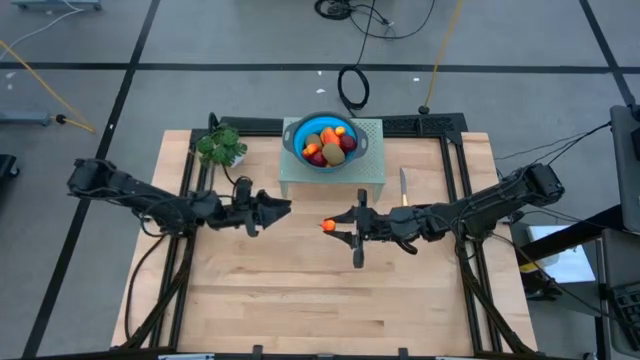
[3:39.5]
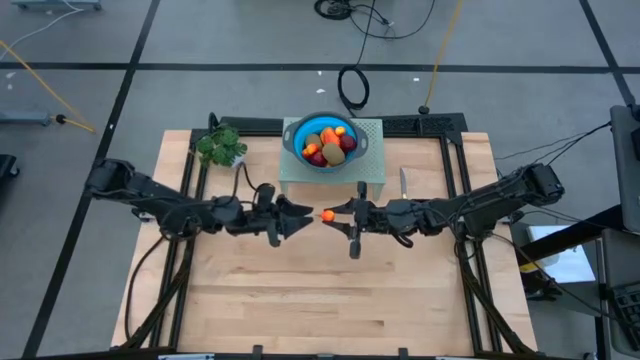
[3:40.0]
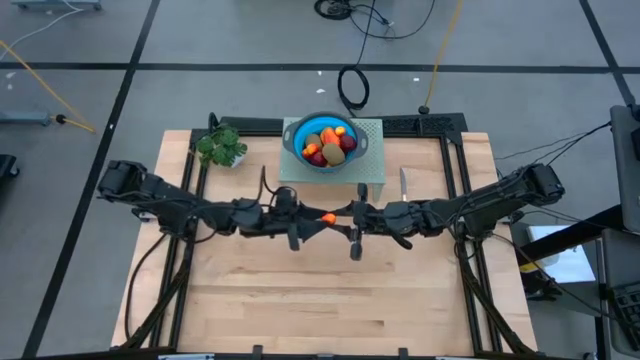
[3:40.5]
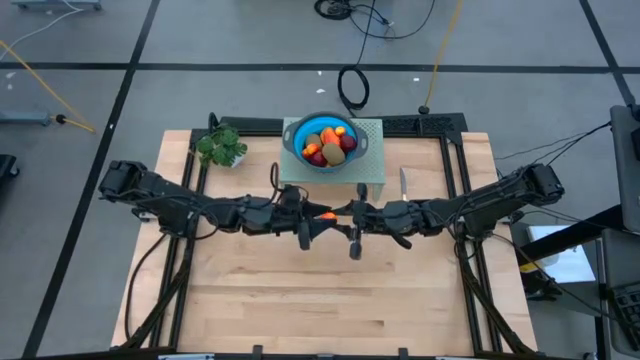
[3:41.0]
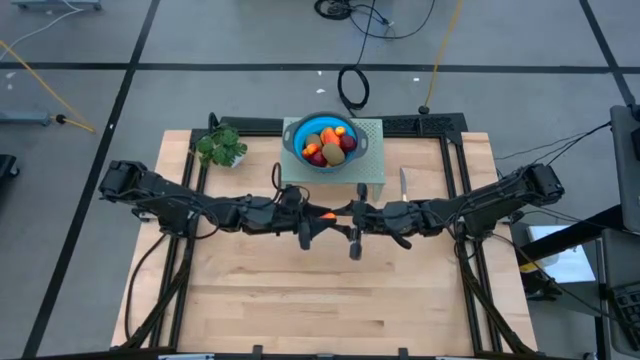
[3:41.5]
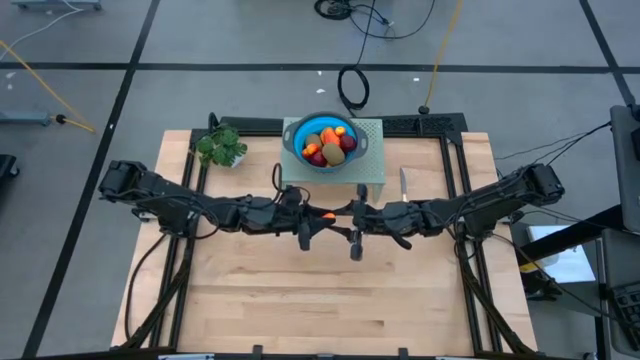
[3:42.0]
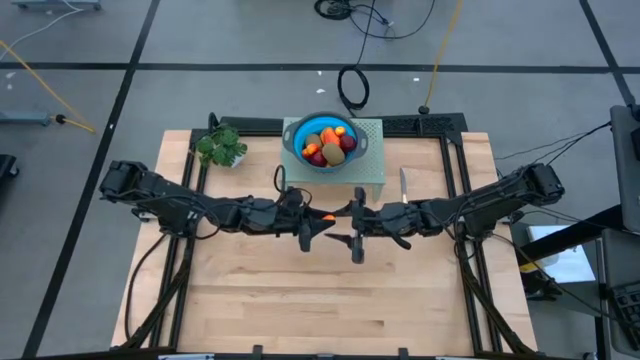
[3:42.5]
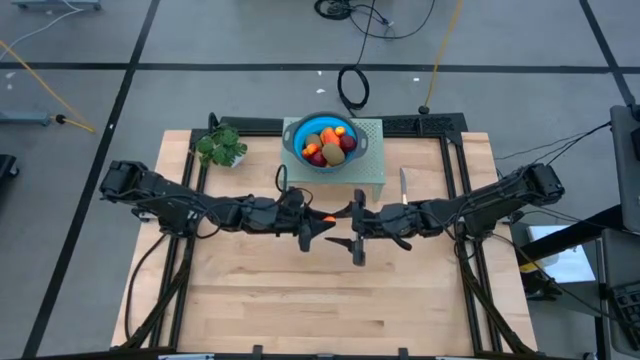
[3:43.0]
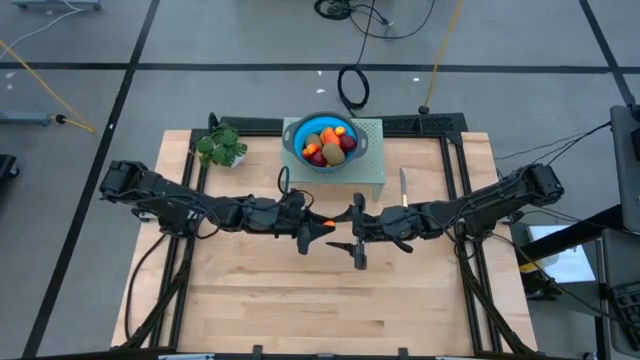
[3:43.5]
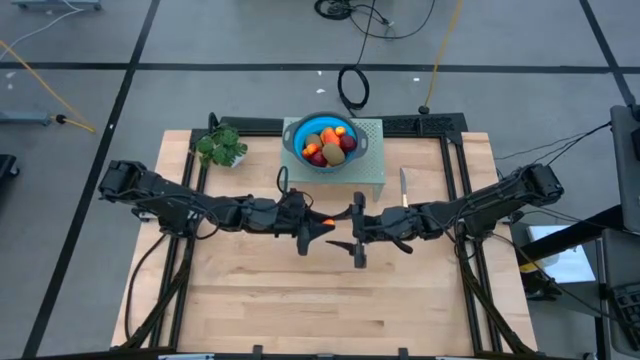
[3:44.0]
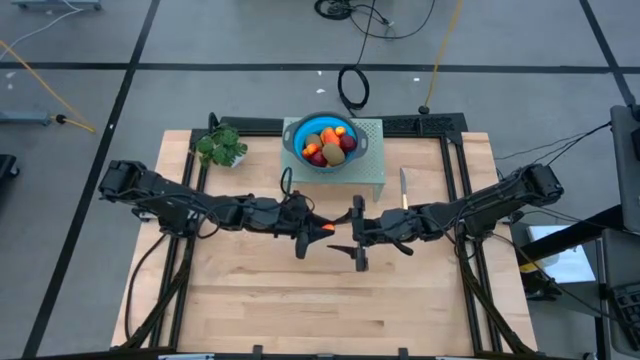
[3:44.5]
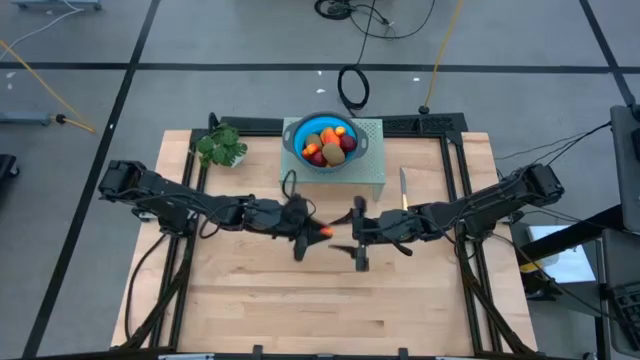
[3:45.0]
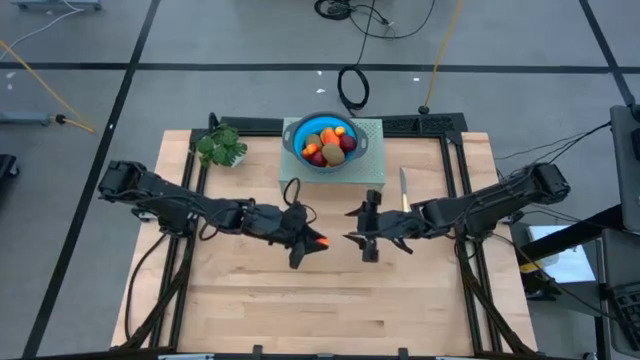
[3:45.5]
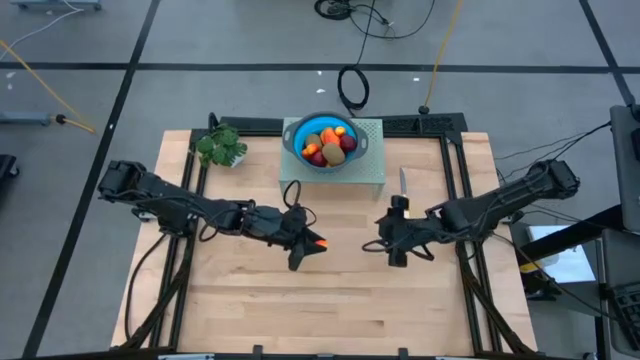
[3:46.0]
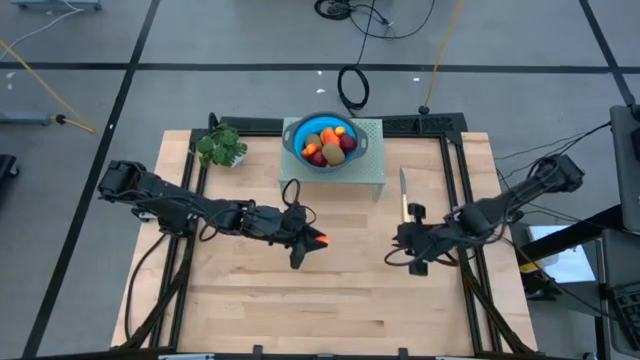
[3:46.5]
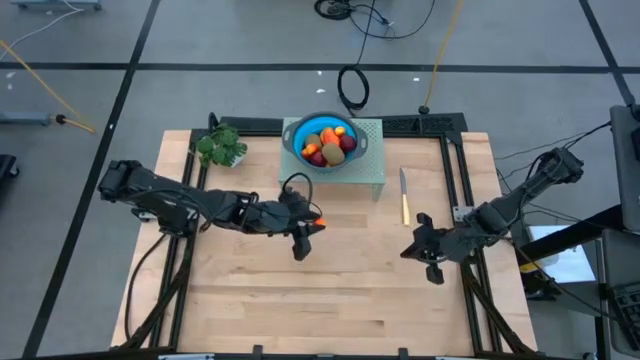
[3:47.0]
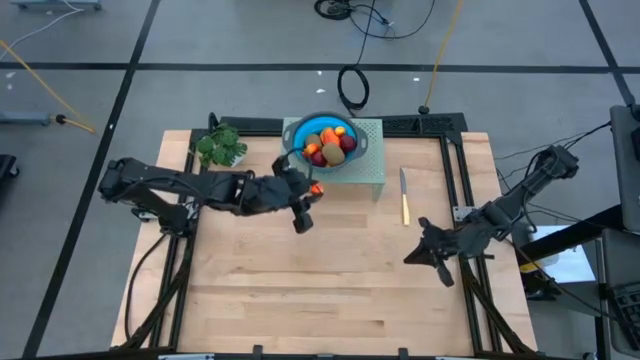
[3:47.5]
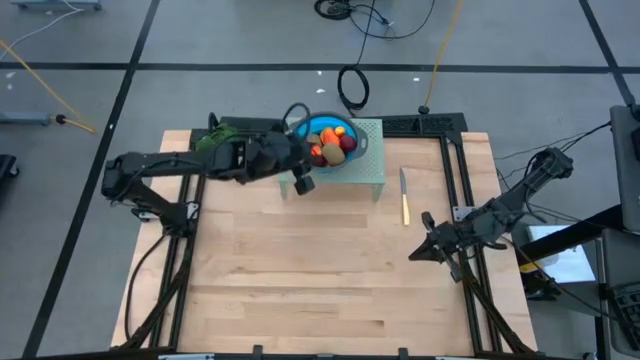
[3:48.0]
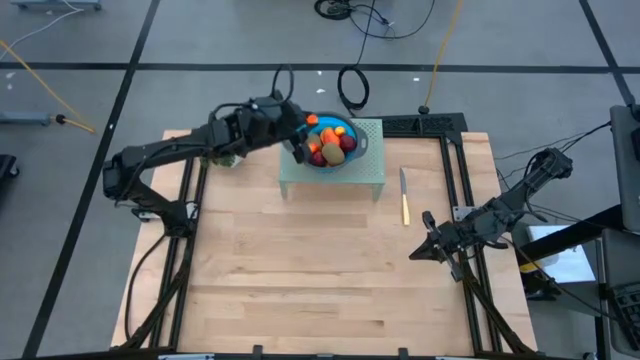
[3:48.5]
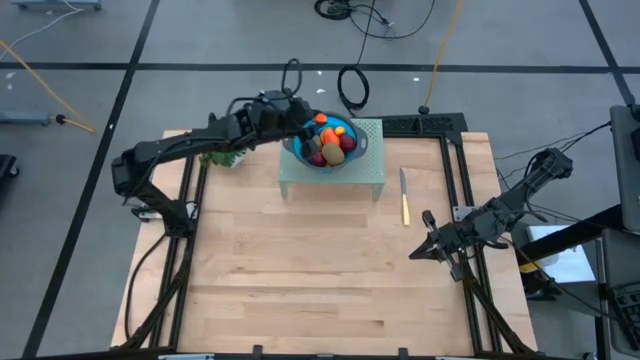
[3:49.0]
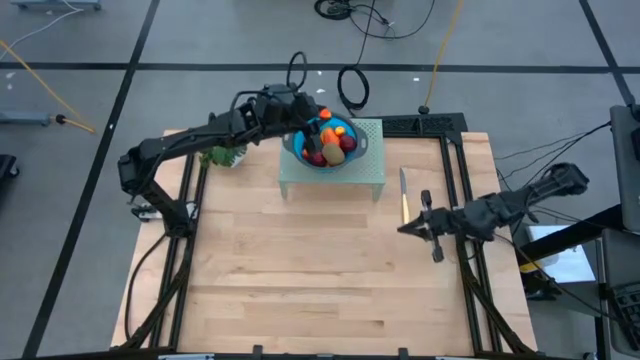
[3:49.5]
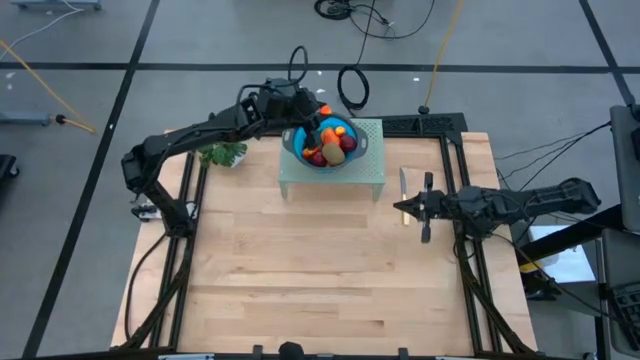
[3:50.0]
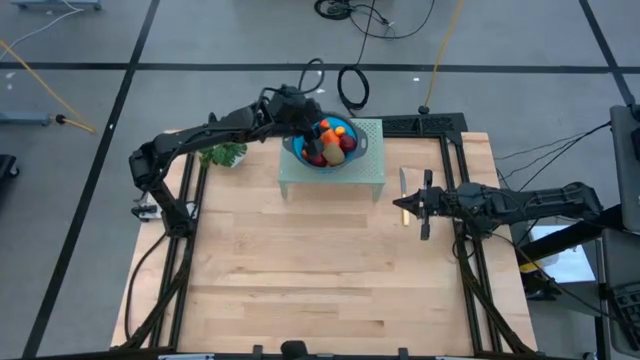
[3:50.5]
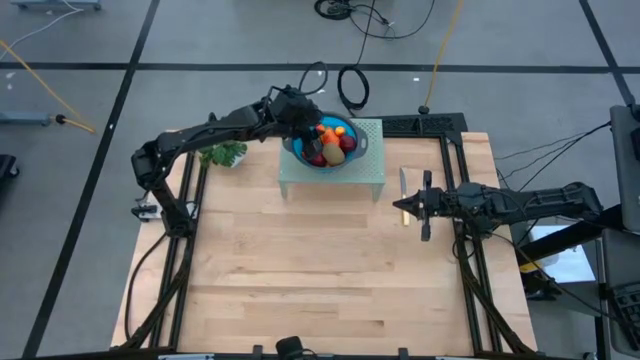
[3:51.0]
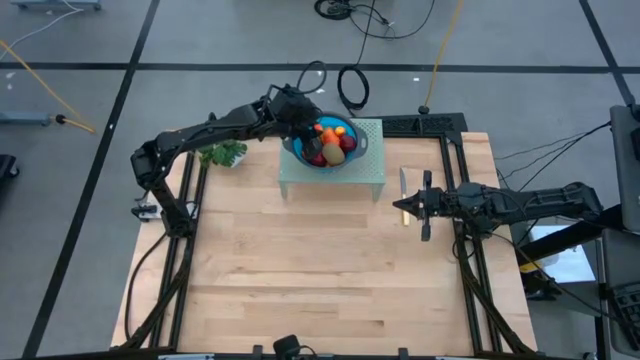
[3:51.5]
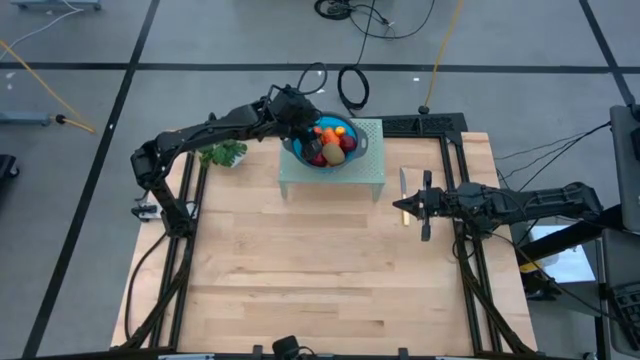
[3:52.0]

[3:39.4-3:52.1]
Task: Pick & Place Fruit
Put the peach into the colander on the shelf

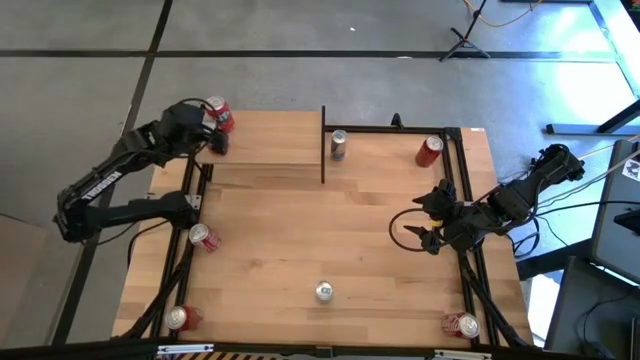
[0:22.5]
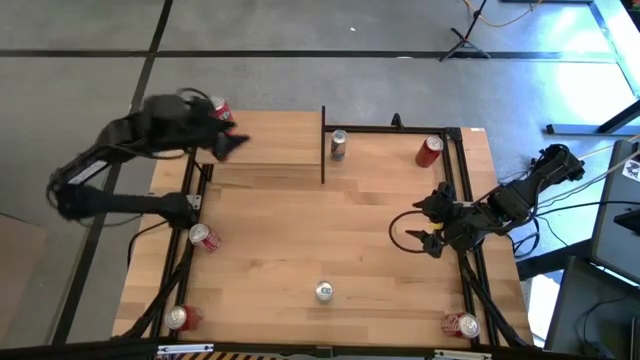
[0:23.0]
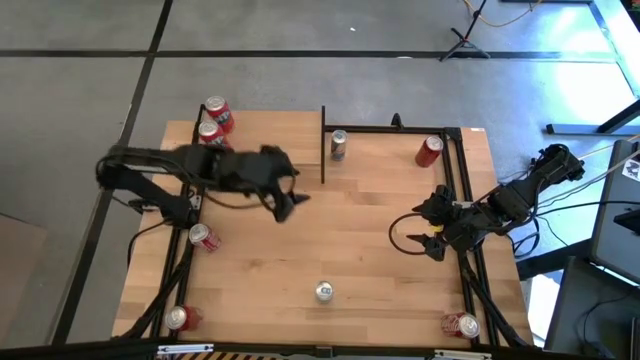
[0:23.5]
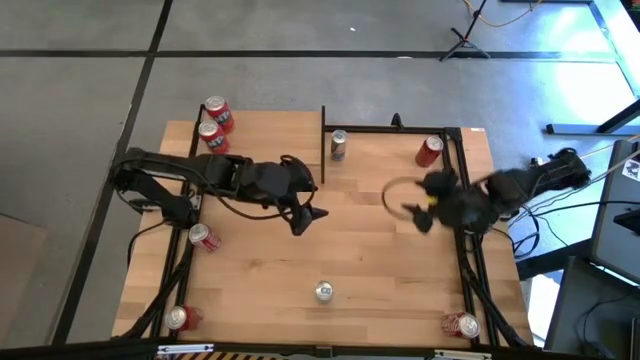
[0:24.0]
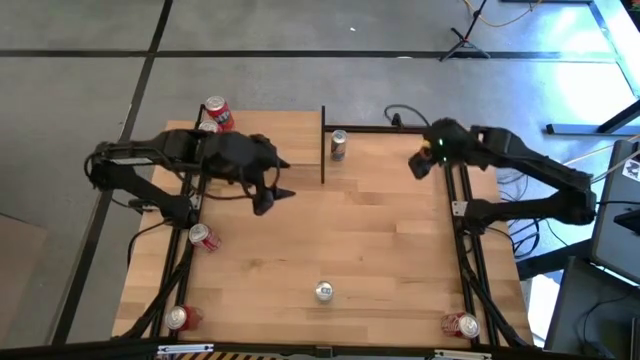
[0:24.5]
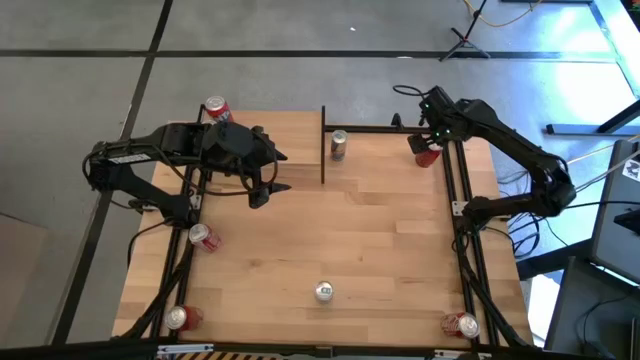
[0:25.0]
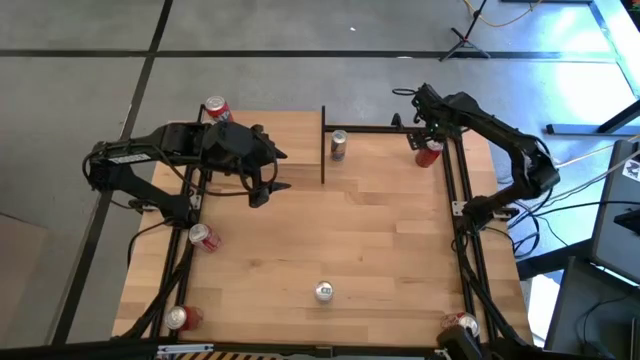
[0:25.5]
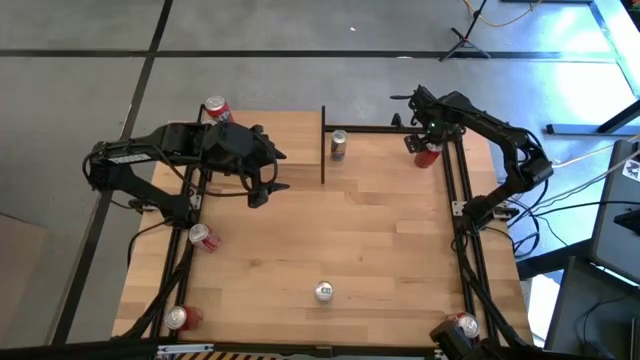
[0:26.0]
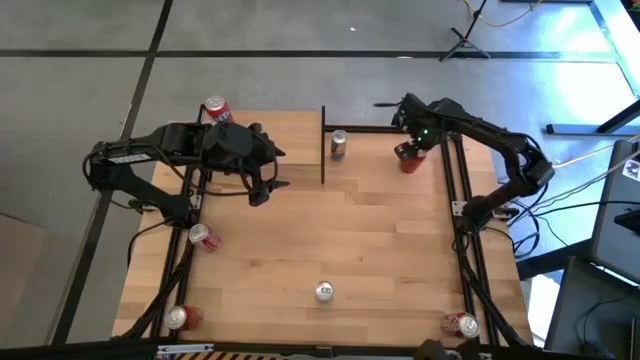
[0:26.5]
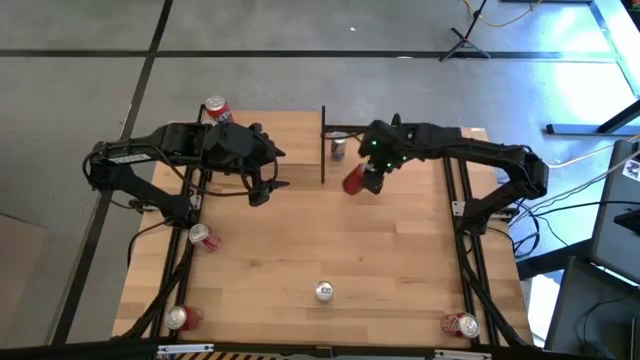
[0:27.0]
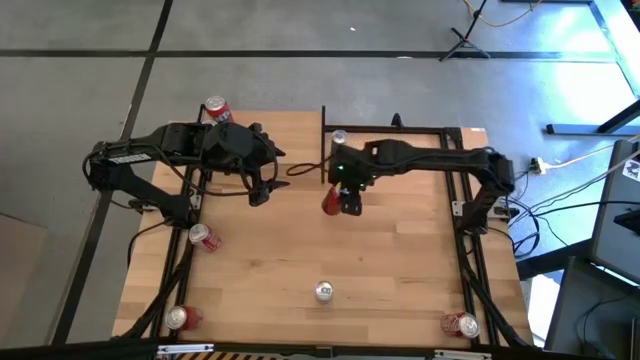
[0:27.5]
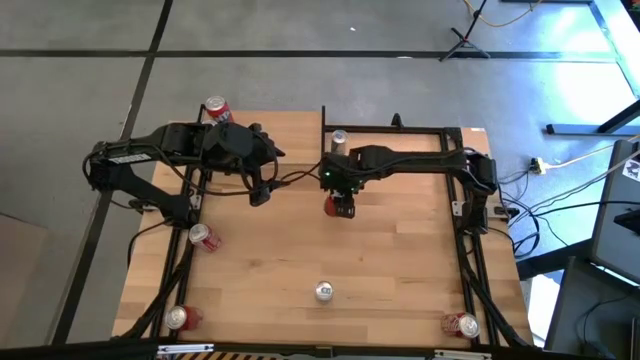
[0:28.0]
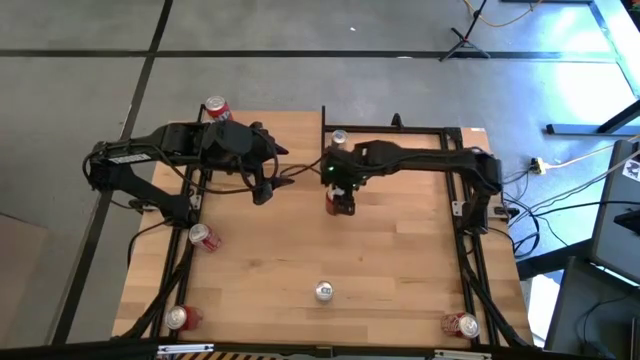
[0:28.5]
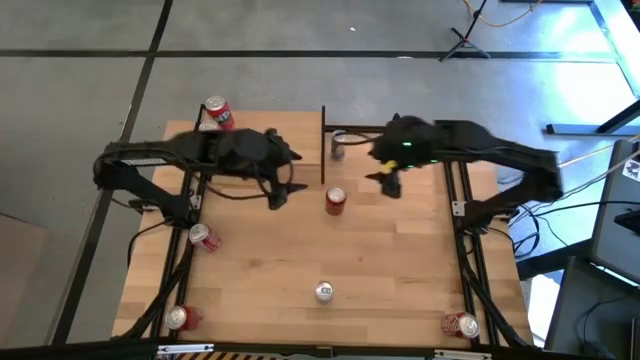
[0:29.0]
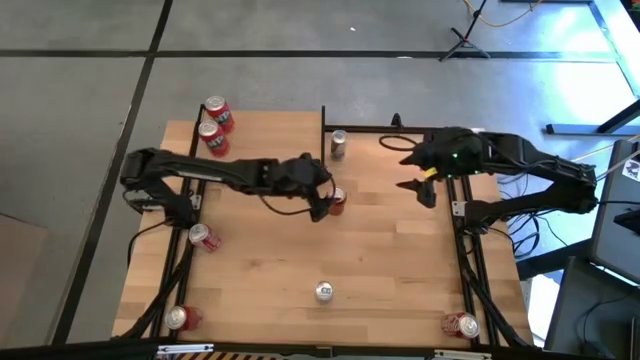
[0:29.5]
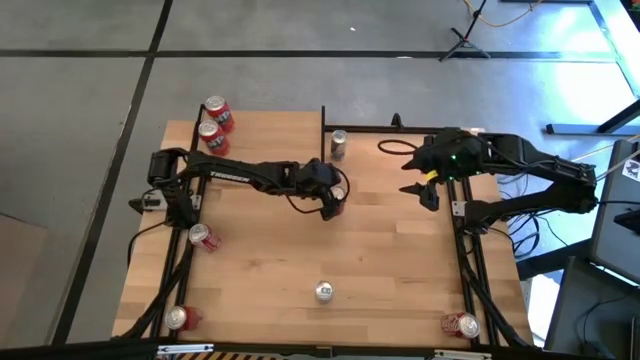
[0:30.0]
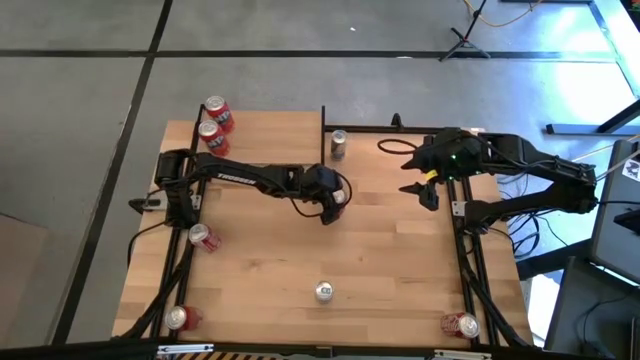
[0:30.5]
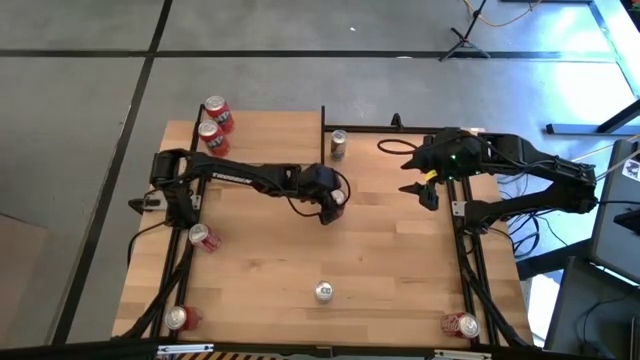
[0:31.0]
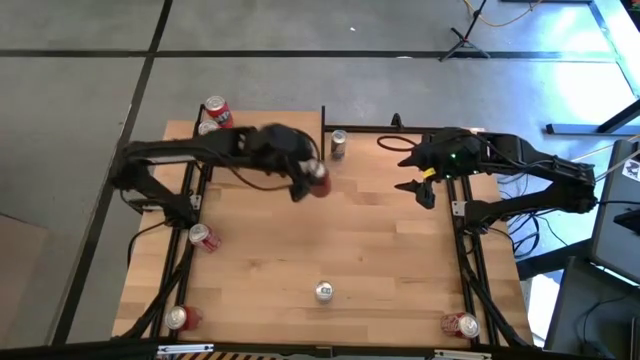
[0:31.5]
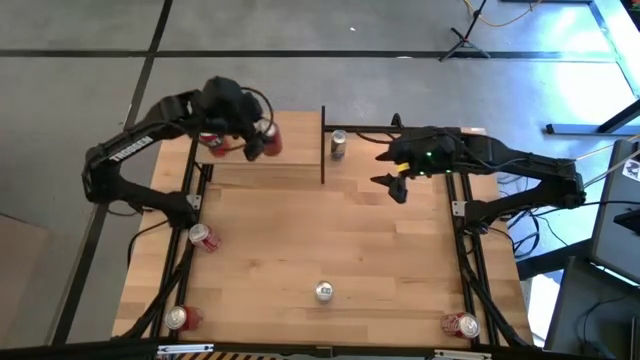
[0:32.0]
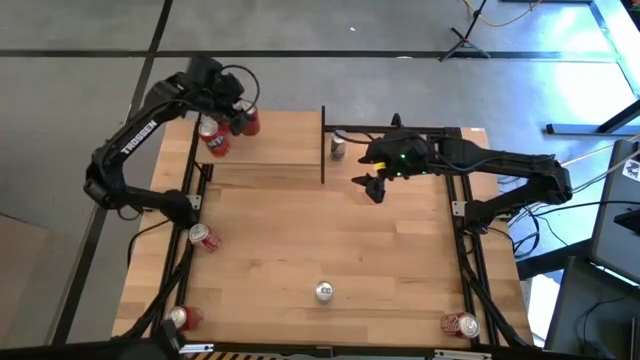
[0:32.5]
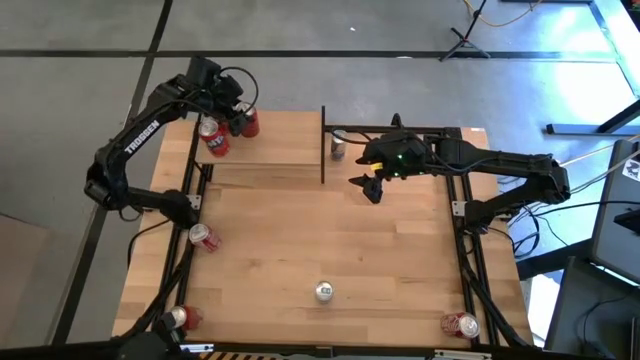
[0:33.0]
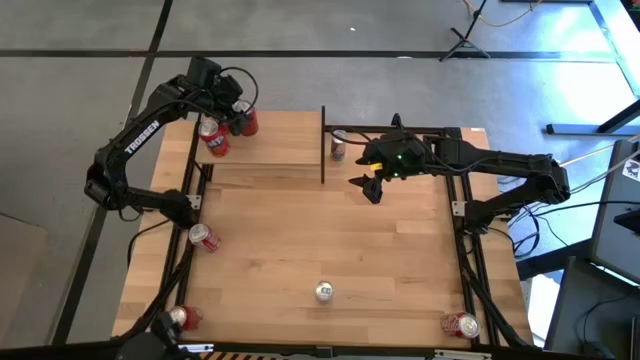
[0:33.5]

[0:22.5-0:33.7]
Task: Place canned beverage on shelf
Put the right red black soda can on the shelf
